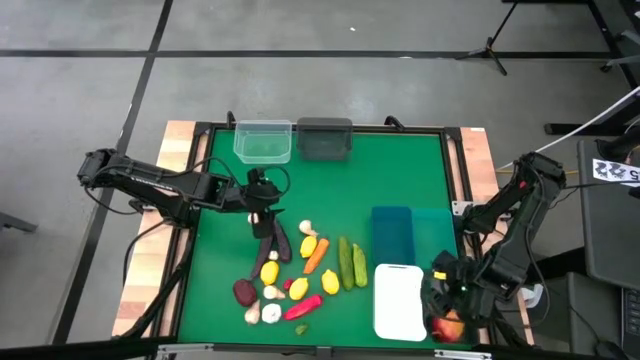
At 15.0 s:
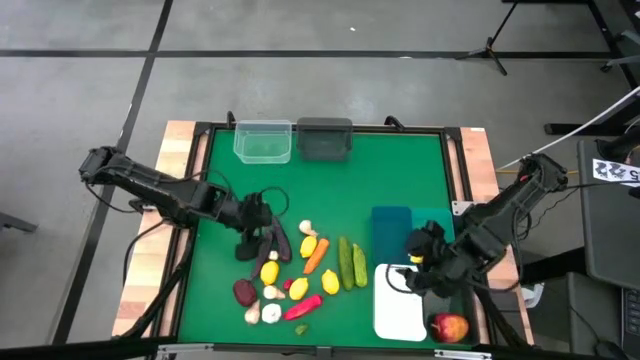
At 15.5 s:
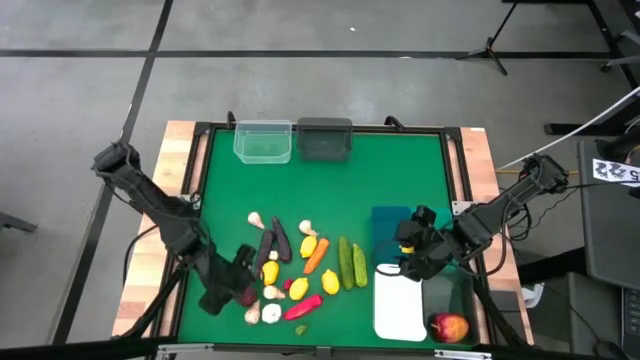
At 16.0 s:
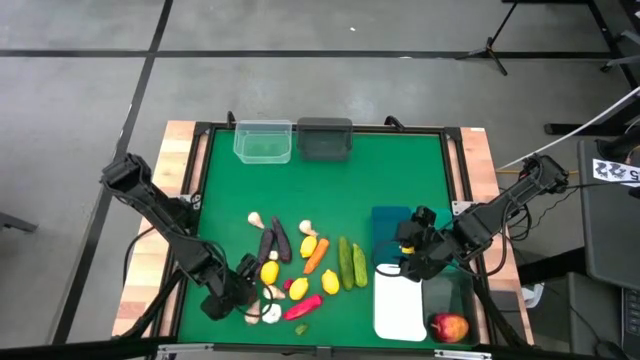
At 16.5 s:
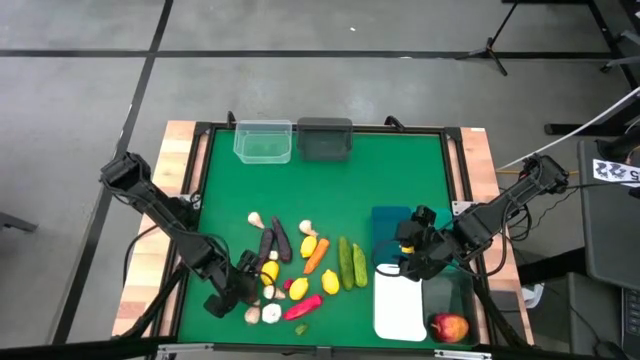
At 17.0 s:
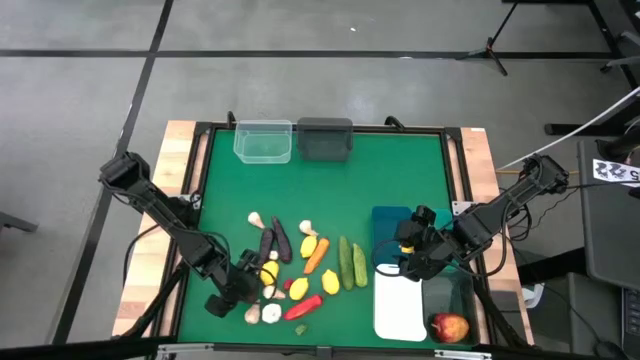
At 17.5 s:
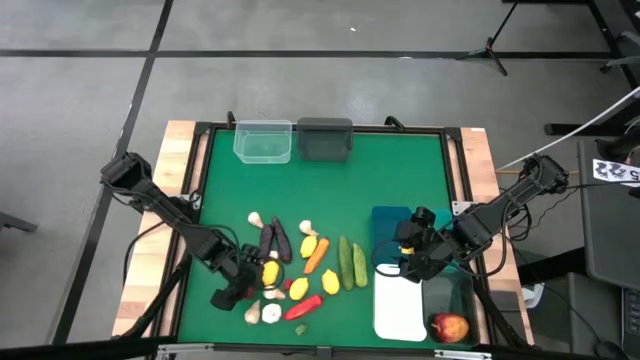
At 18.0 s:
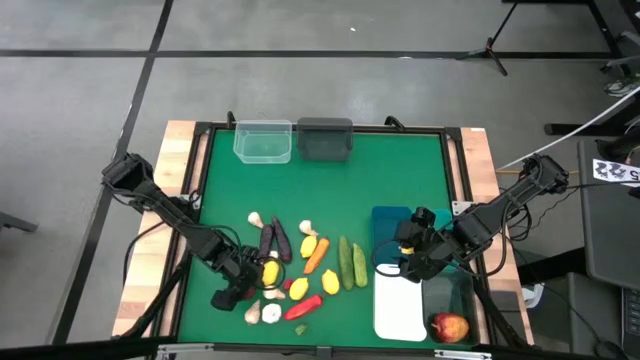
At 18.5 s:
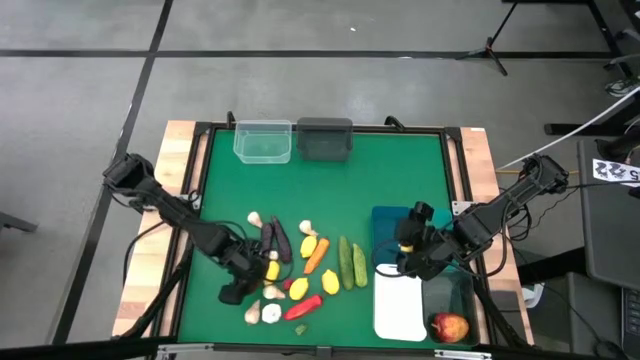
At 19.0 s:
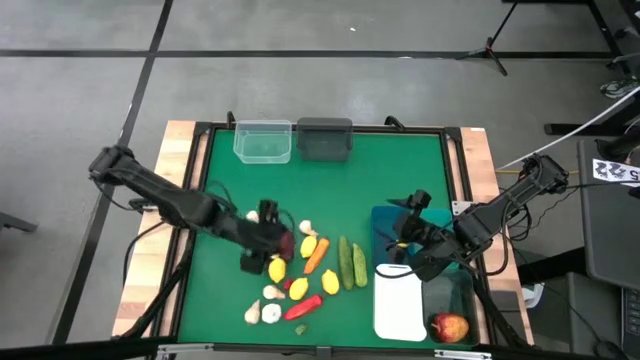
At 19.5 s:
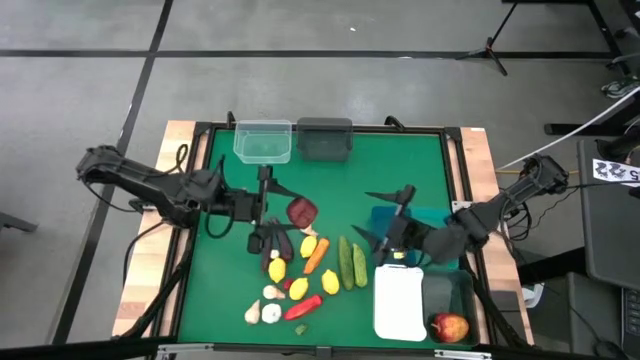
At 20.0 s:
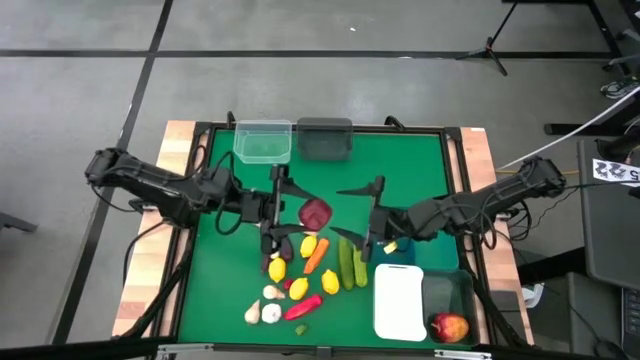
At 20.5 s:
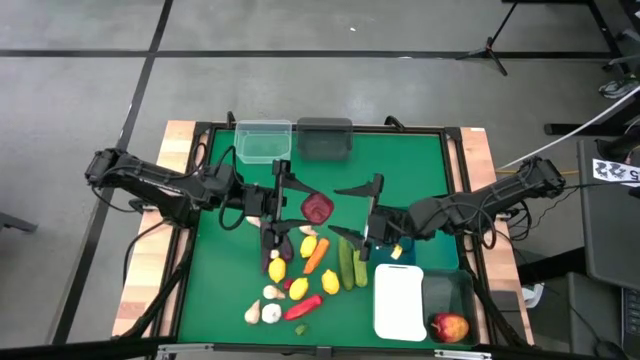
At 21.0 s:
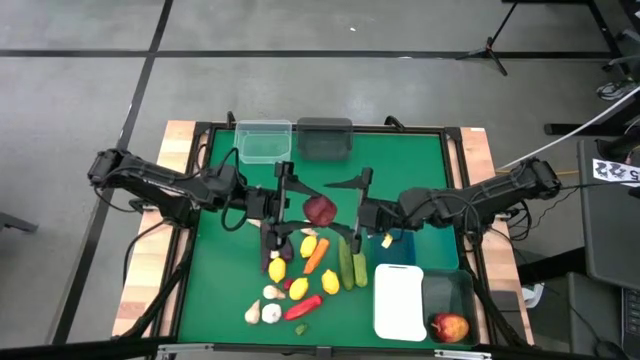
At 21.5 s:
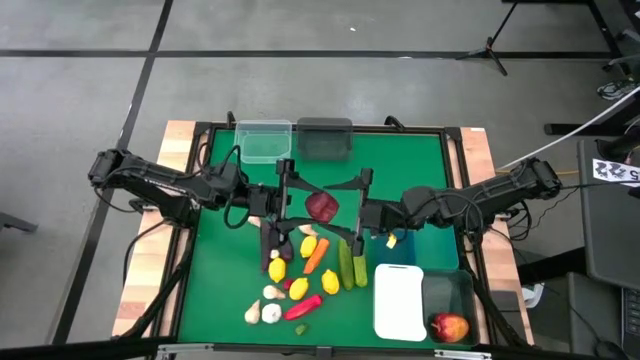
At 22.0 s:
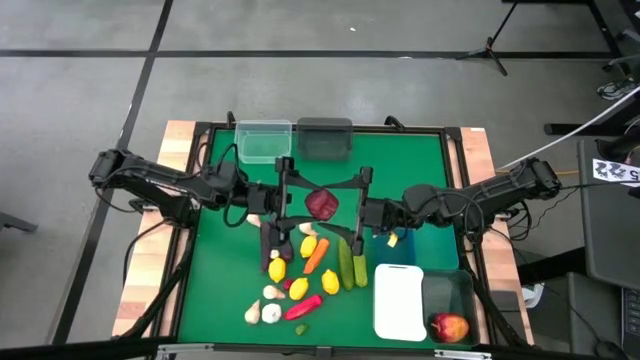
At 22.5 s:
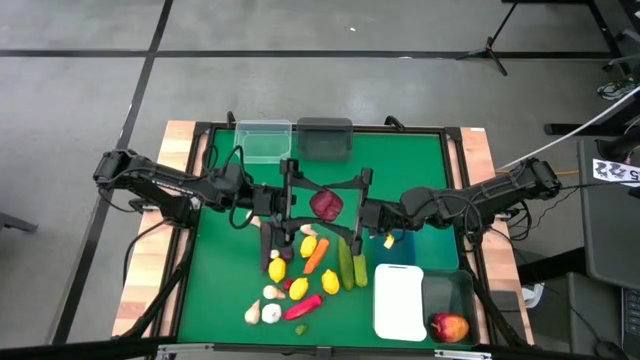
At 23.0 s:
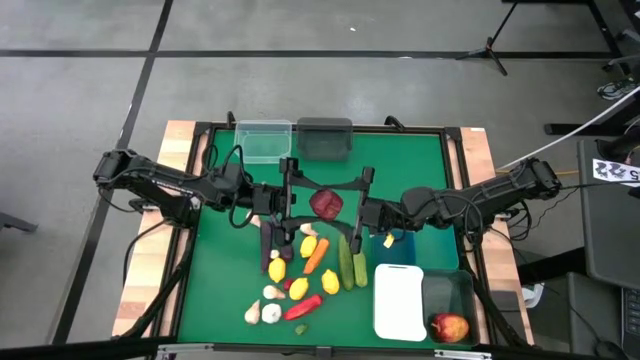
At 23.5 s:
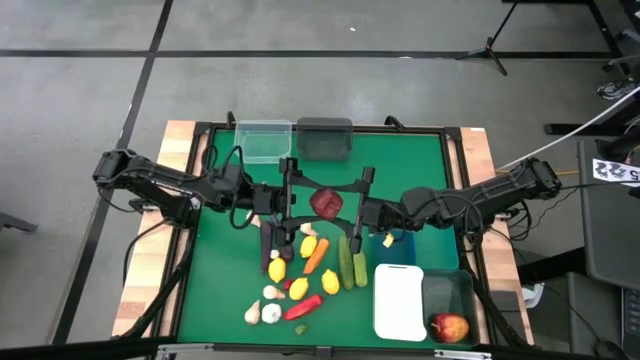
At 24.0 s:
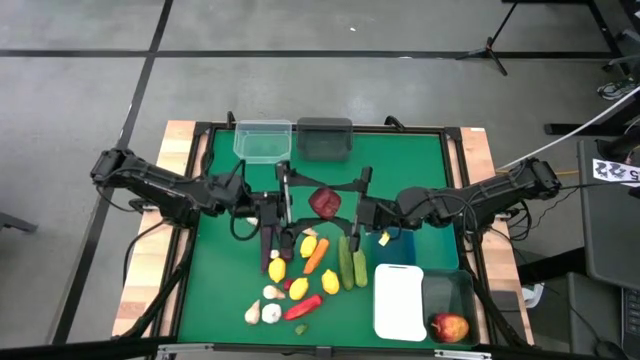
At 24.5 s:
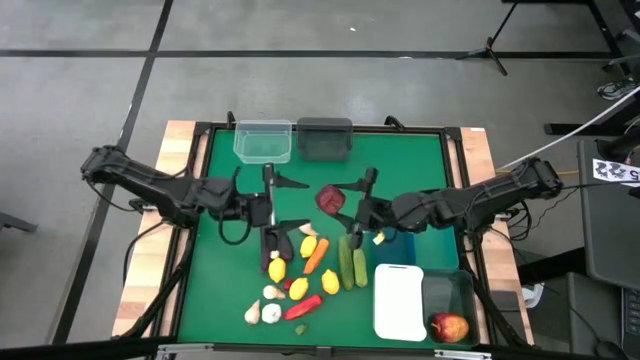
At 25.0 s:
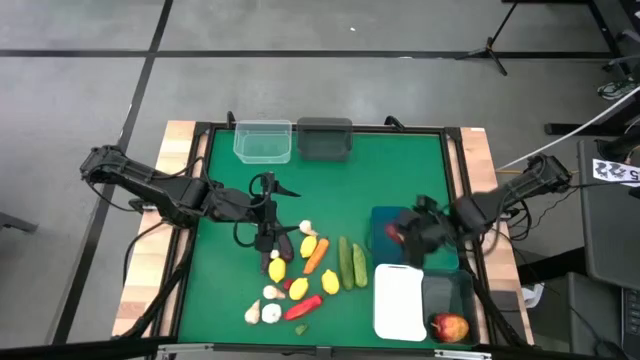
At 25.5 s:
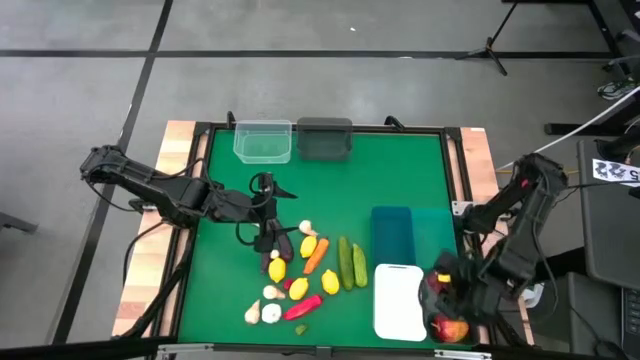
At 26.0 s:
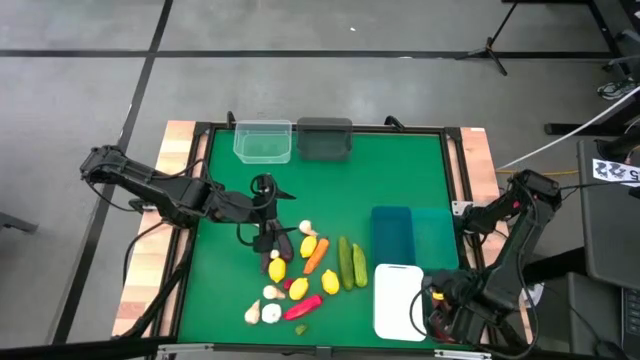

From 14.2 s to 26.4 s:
Task: Sort produce into baskets
Put the red apple into the bottom black bin

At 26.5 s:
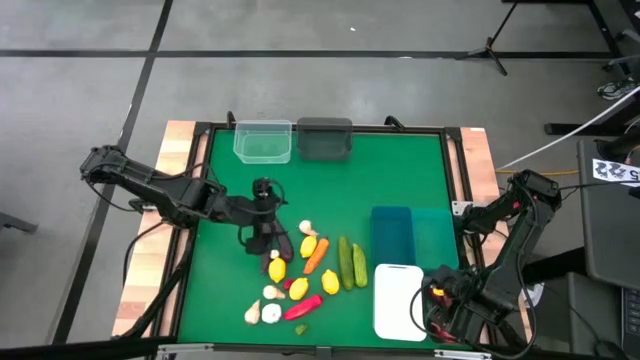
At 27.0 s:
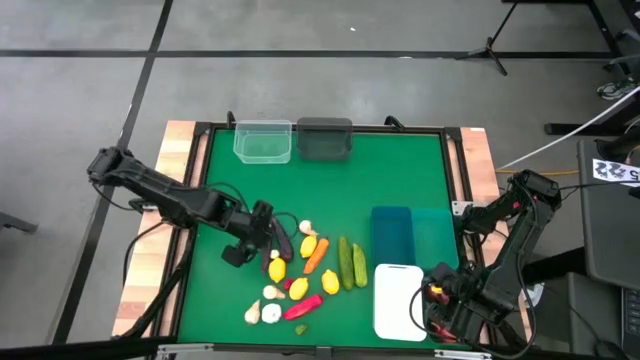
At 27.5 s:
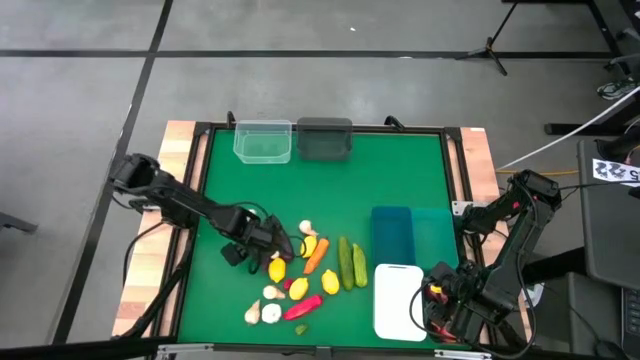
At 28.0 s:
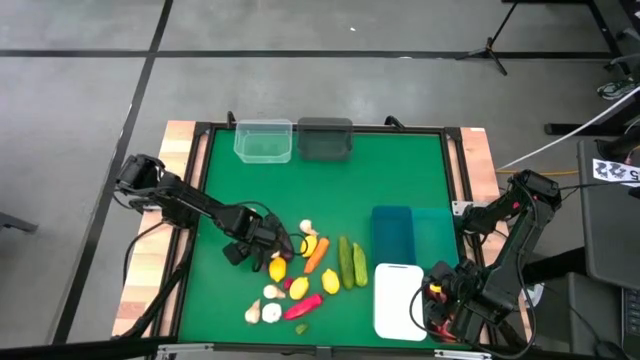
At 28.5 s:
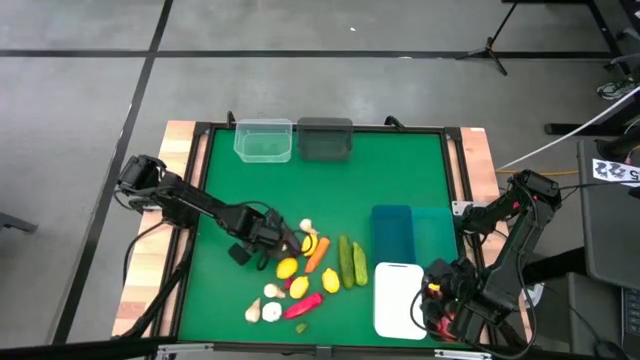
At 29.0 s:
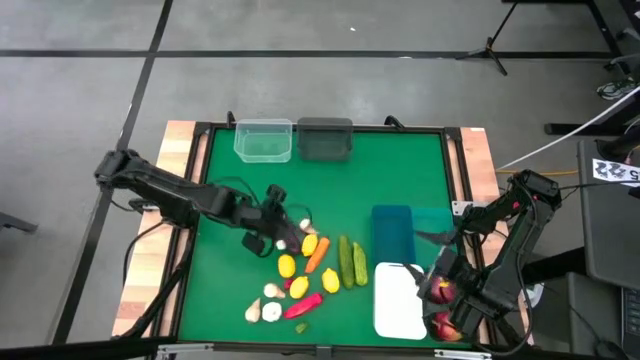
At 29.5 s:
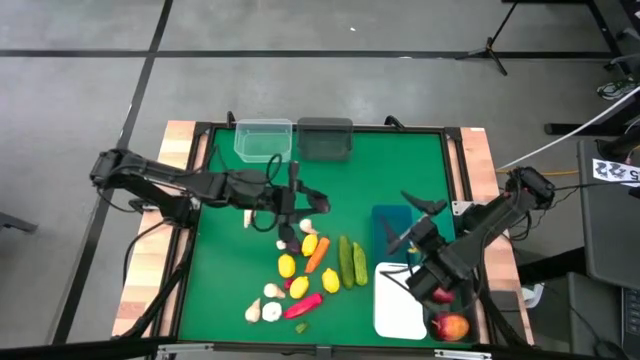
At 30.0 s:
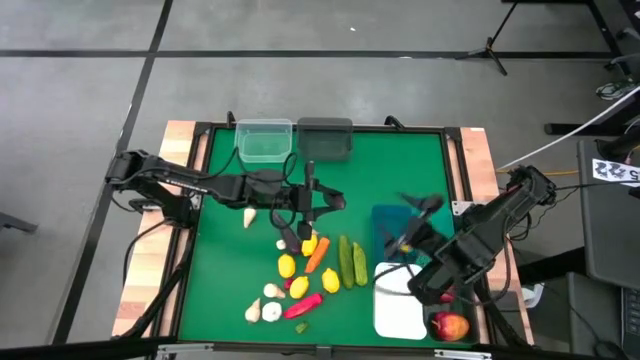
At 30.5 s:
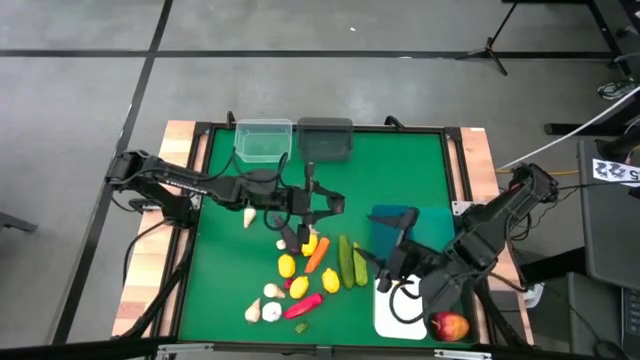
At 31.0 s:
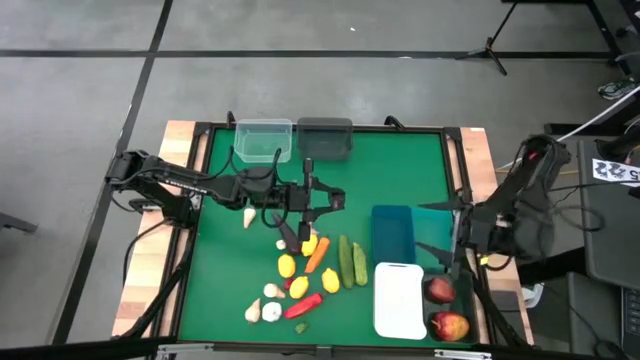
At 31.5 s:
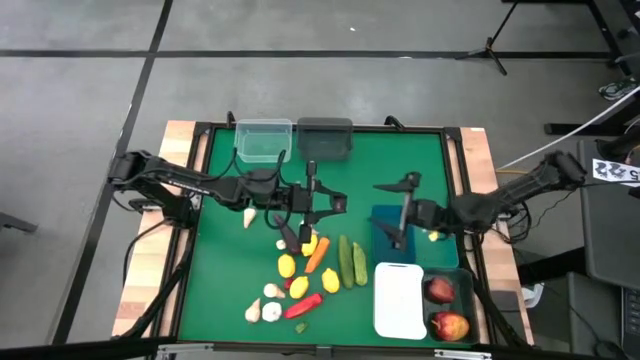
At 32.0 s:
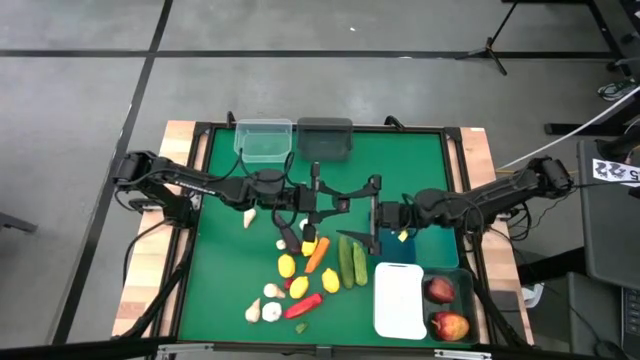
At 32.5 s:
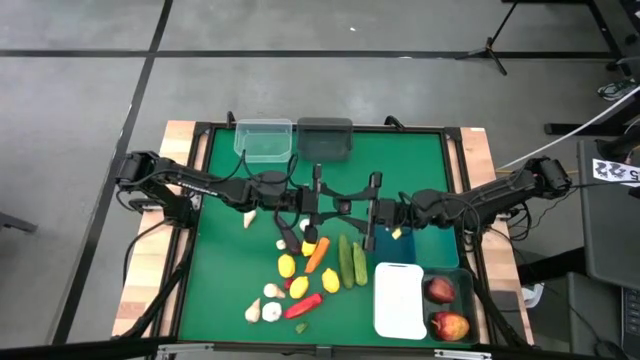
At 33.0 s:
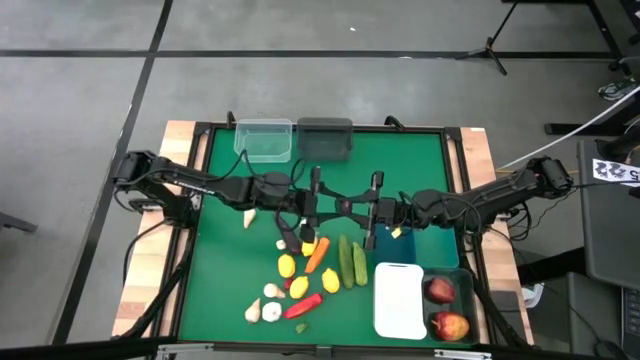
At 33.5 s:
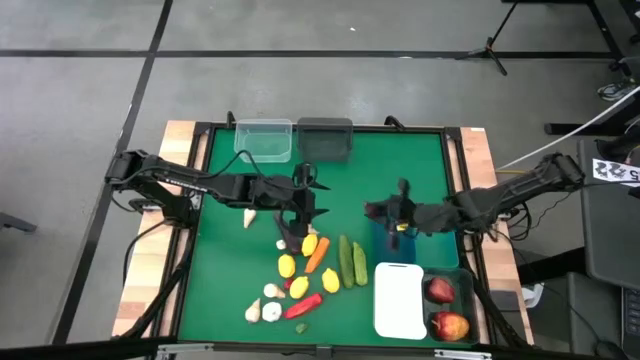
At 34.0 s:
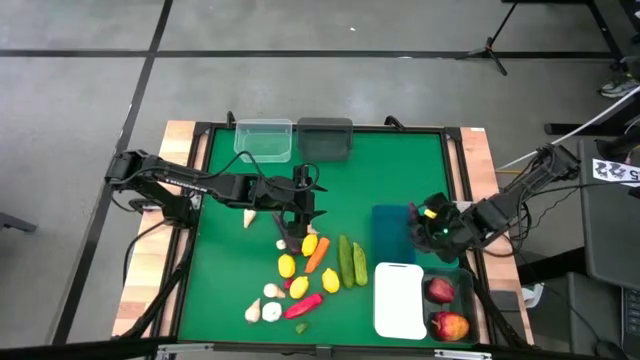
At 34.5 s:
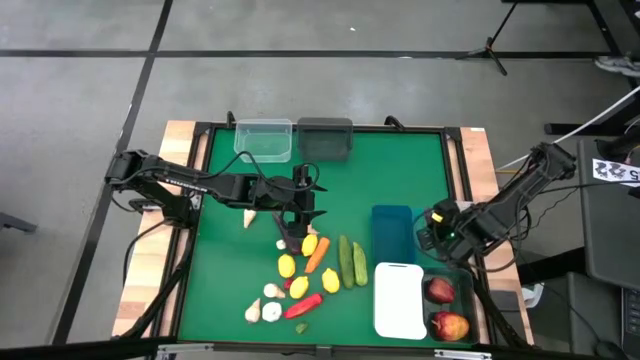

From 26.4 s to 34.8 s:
Put the purple eggplant into the green bin

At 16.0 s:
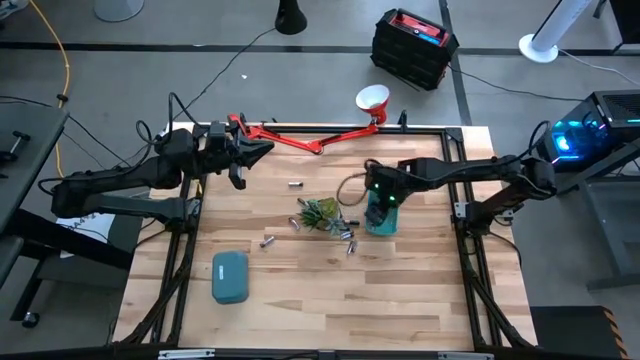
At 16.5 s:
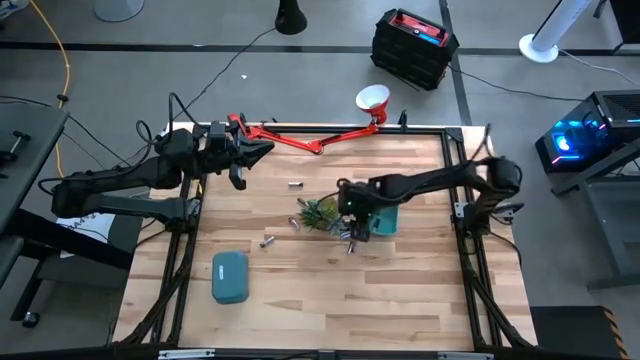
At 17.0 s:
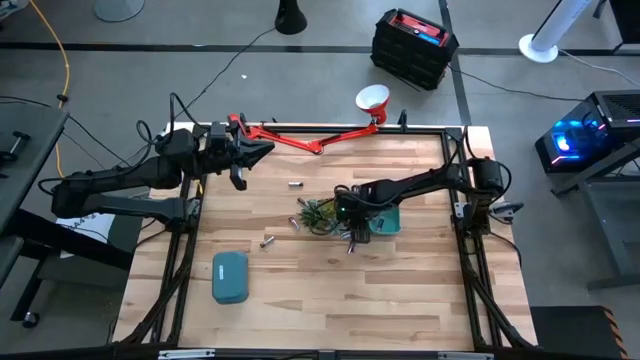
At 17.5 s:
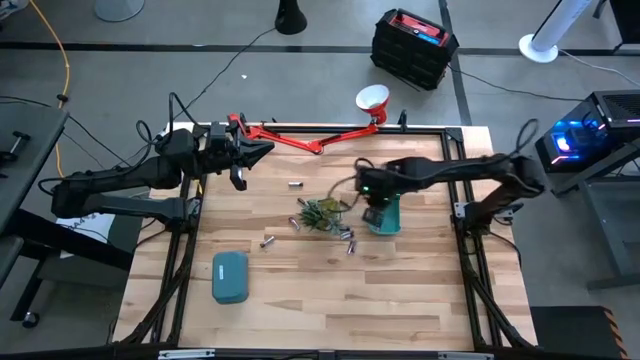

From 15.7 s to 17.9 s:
Task: Sort batteries
Put the black battery into the green bin
